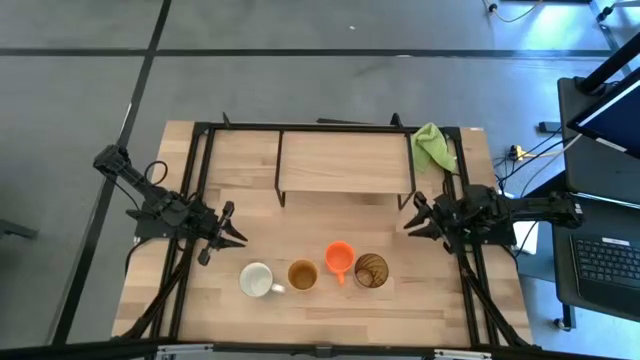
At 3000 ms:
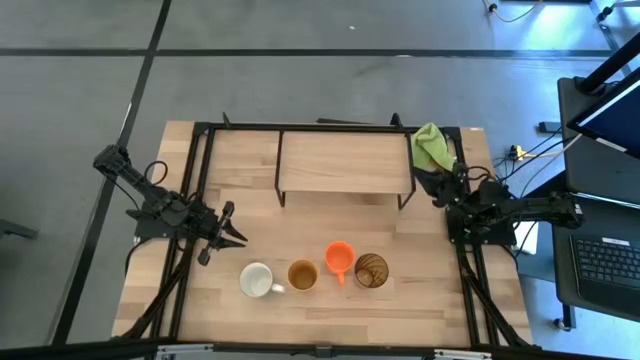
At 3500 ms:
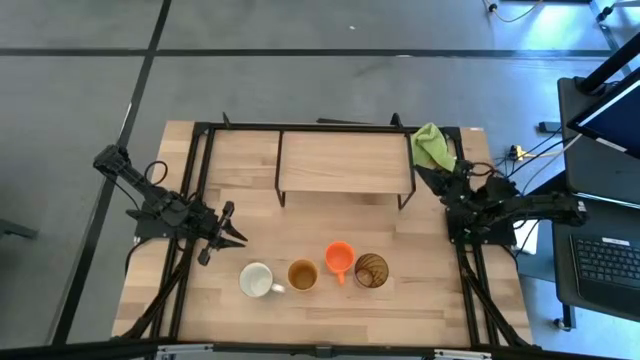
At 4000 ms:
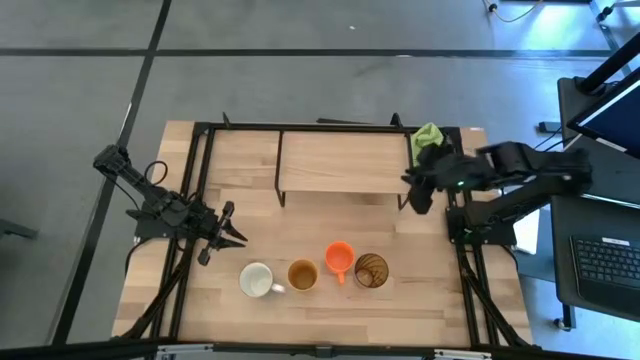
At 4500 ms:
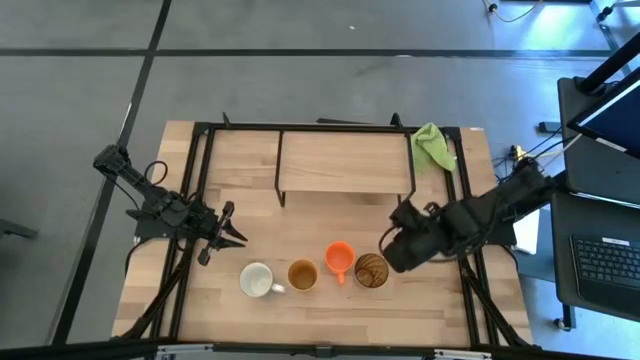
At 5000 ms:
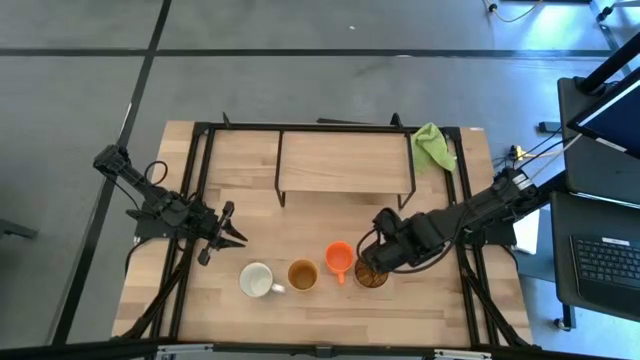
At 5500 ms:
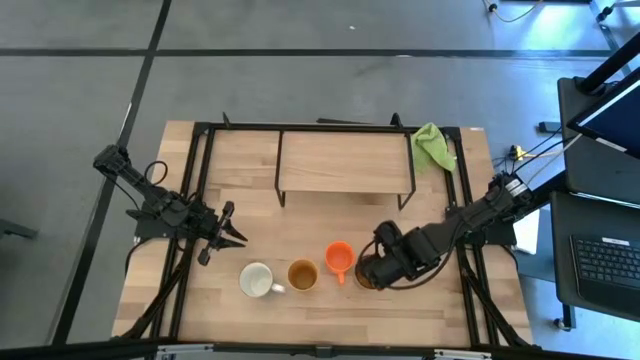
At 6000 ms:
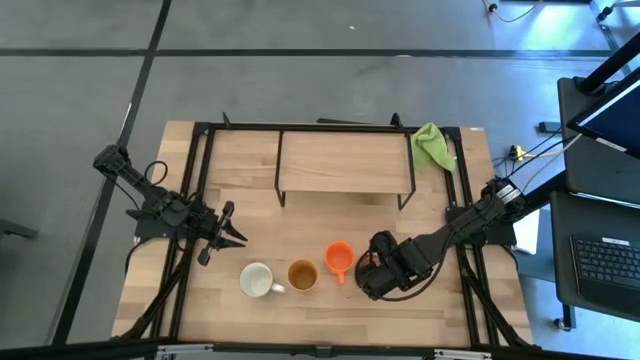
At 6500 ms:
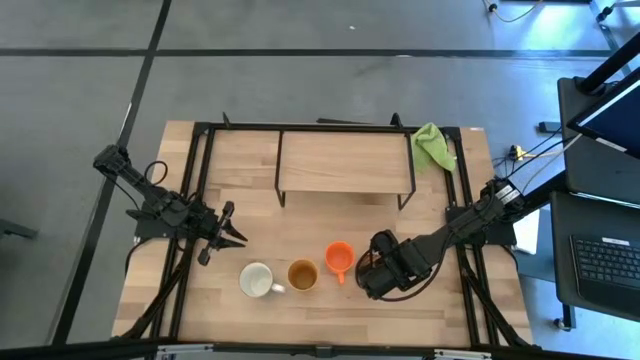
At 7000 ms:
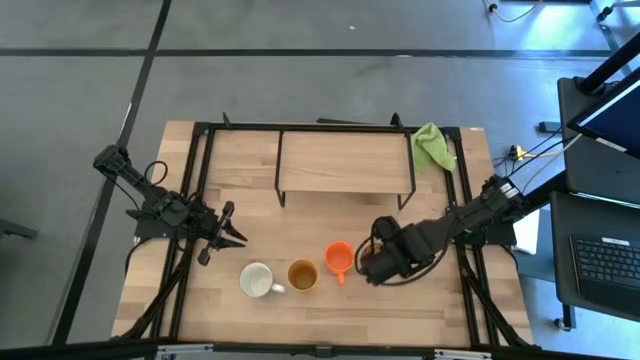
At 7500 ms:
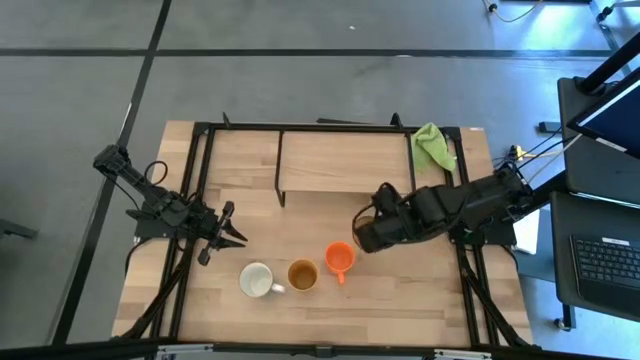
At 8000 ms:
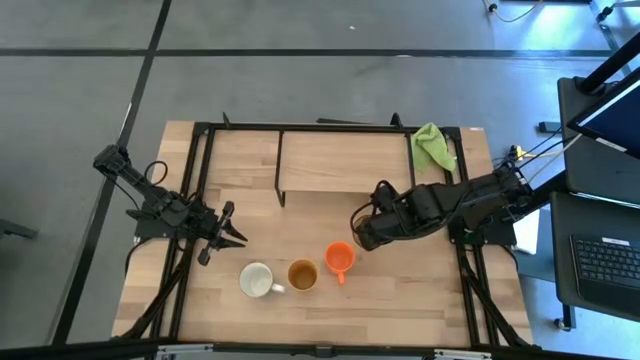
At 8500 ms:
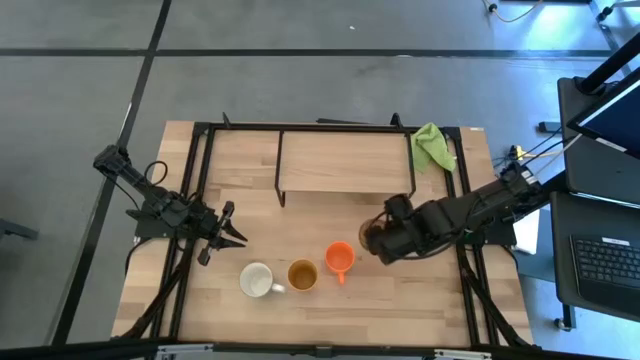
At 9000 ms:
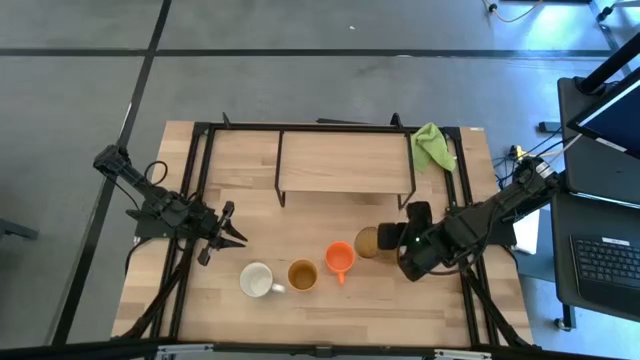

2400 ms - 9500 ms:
Task: Stack small to large cups/mugs on shelf
Put the brown cup on the shelf

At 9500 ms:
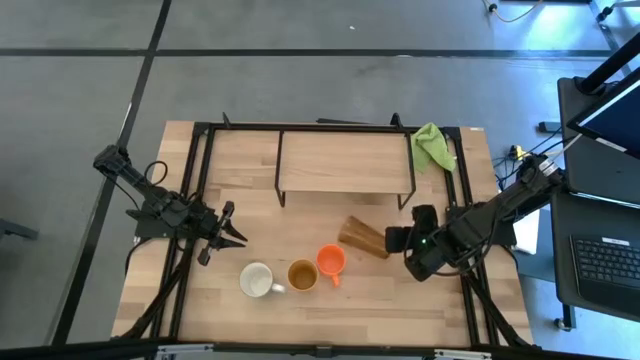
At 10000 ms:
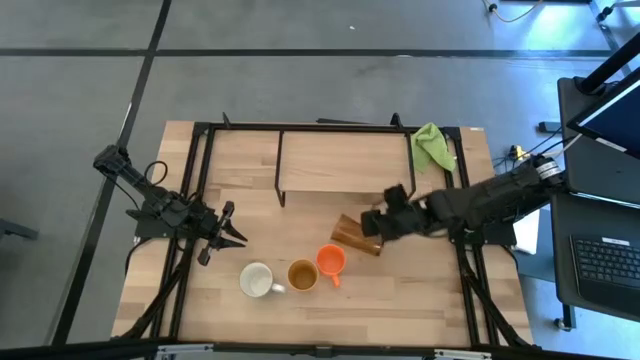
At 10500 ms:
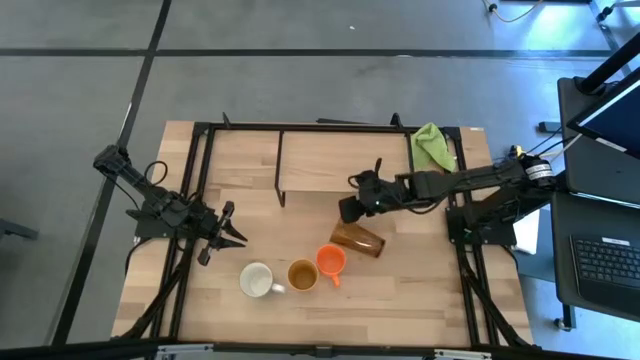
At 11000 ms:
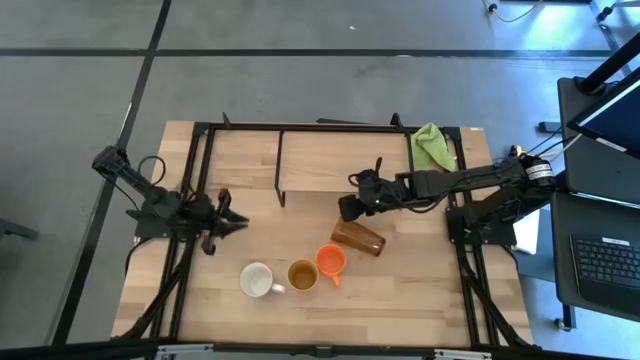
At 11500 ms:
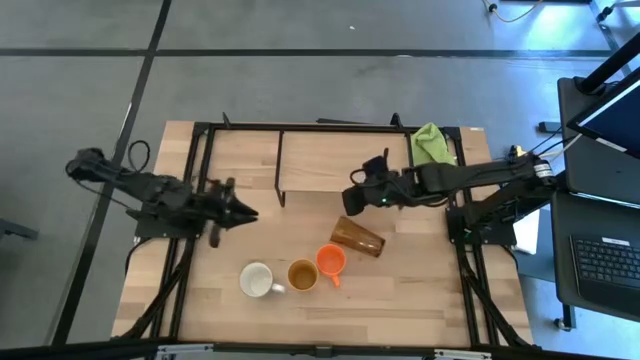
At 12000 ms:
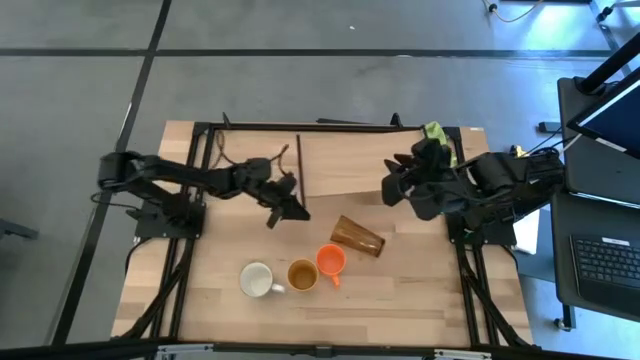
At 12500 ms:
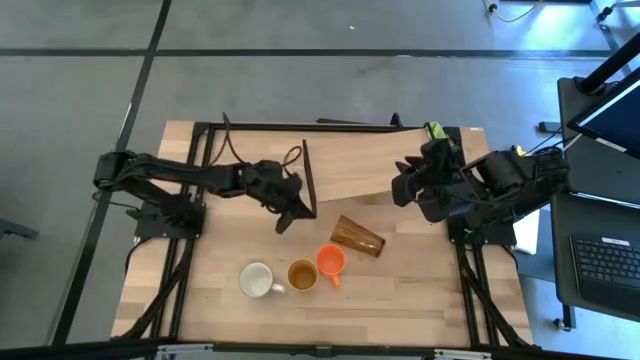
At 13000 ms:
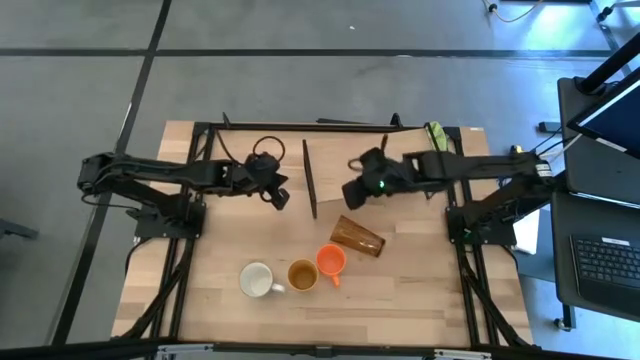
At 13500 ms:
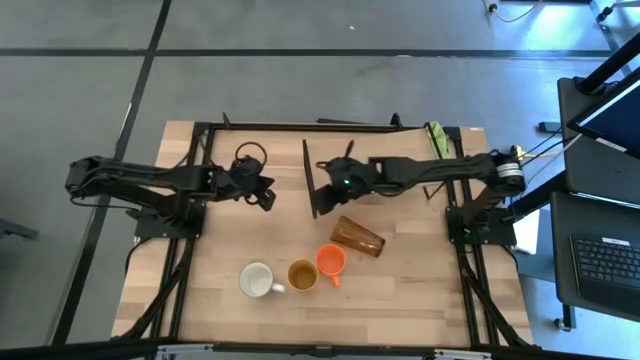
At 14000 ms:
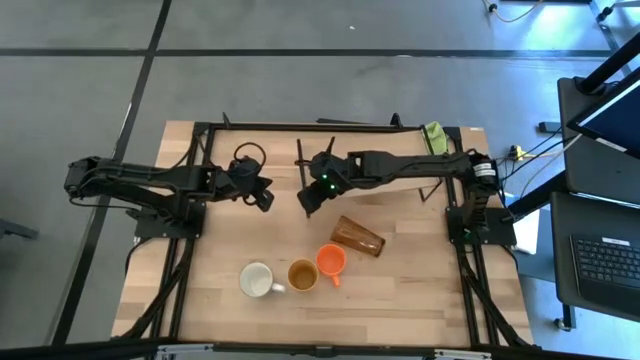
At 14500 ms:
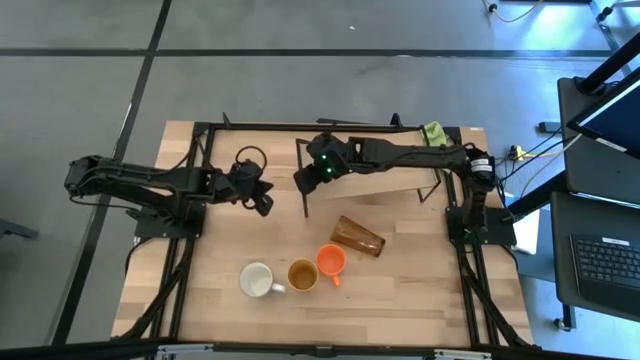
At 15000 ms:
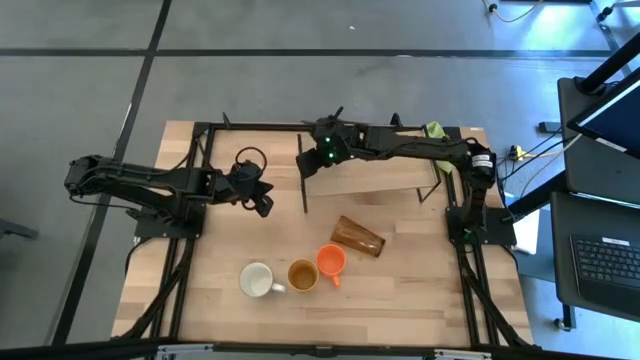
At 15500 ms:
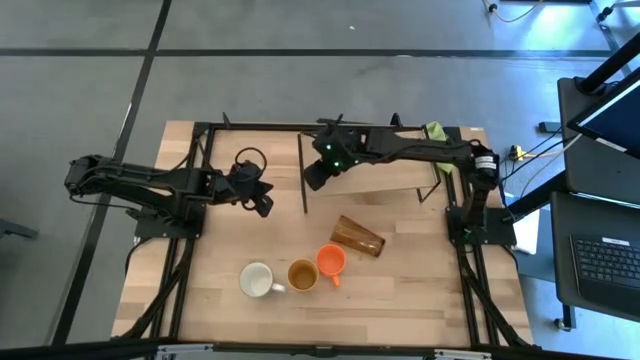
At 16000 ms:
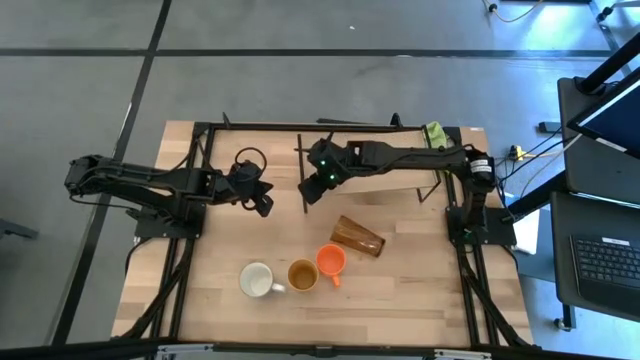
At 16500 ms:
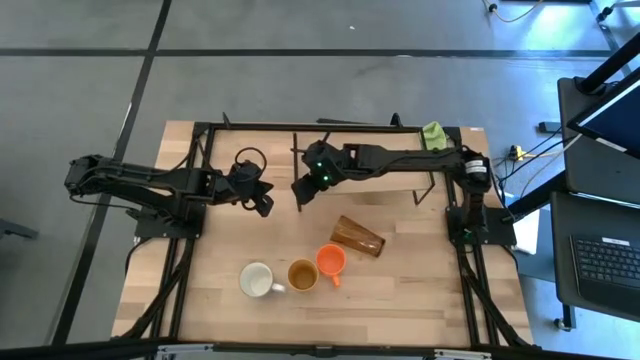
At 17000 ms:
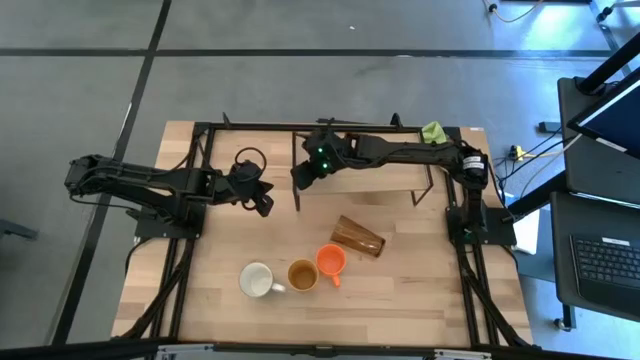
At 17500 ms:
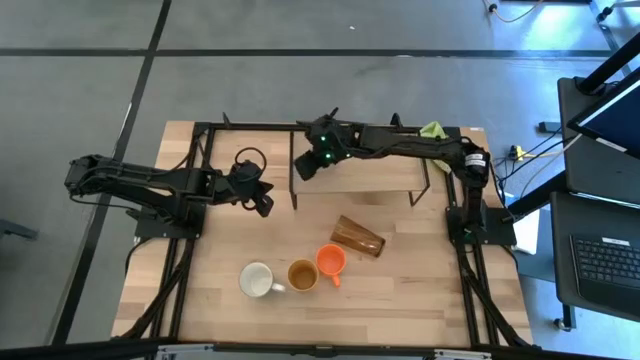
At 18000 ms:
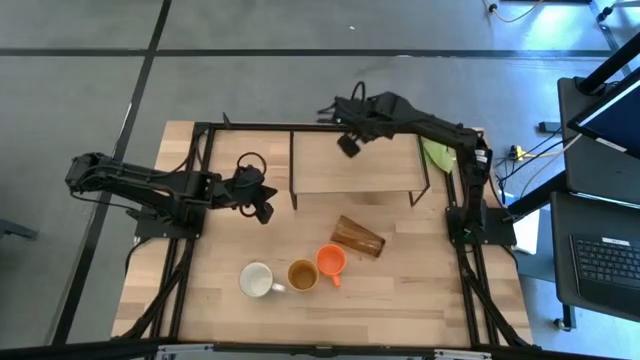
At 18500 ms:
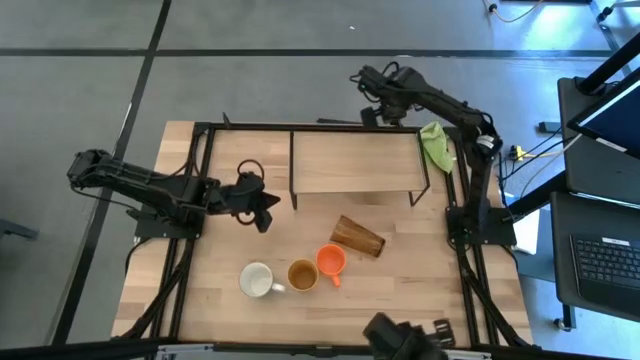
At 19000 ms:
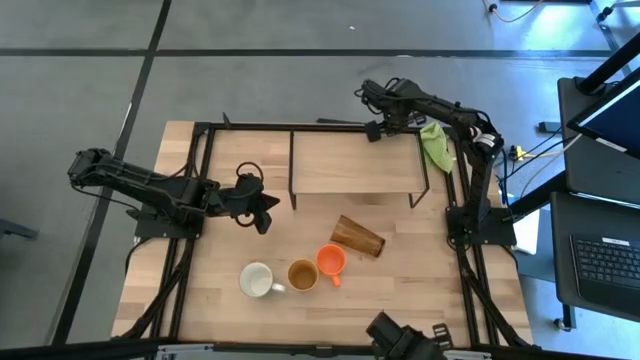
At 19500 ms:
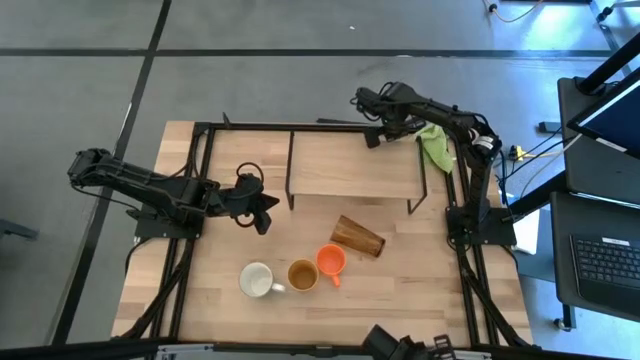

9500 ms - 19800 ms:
Adjust the shelf

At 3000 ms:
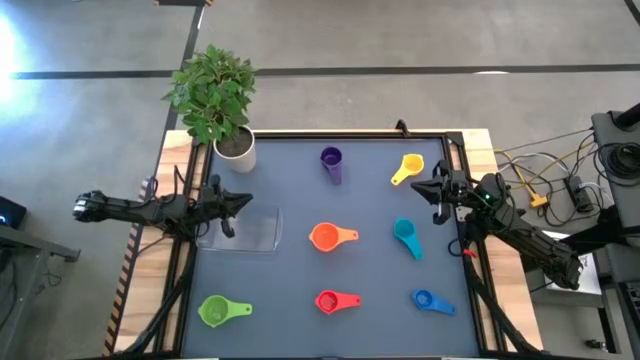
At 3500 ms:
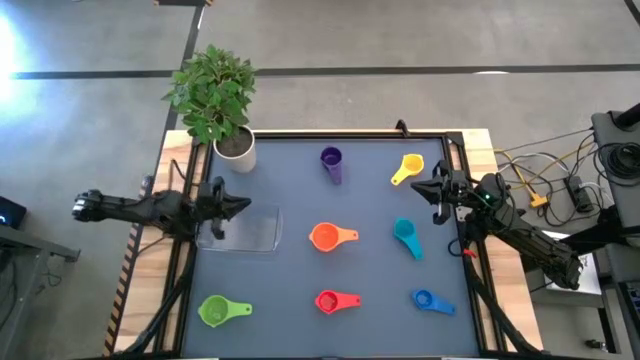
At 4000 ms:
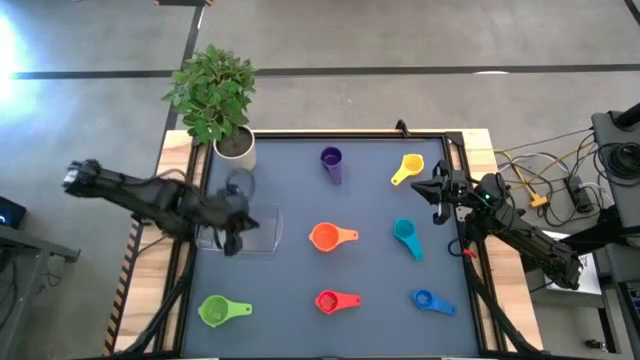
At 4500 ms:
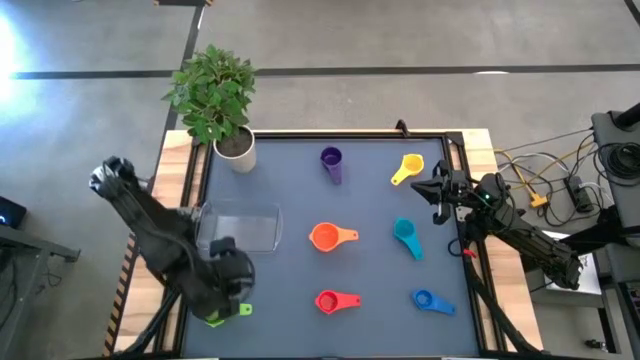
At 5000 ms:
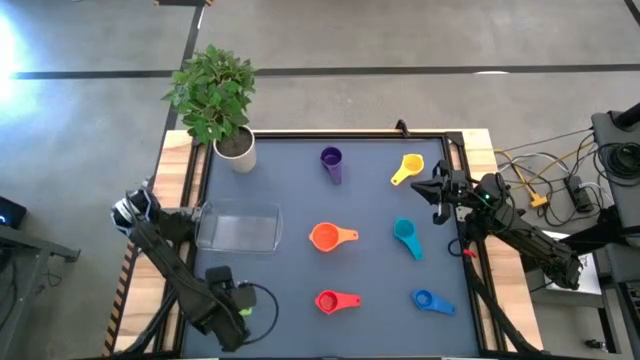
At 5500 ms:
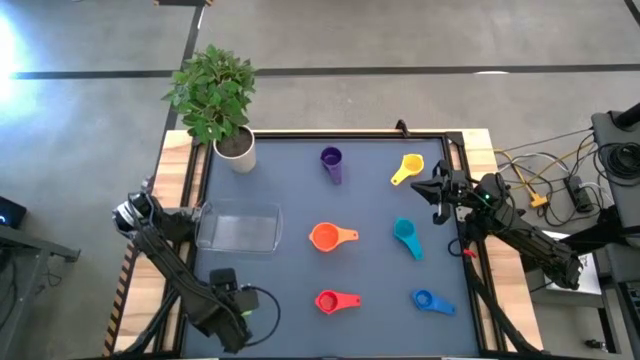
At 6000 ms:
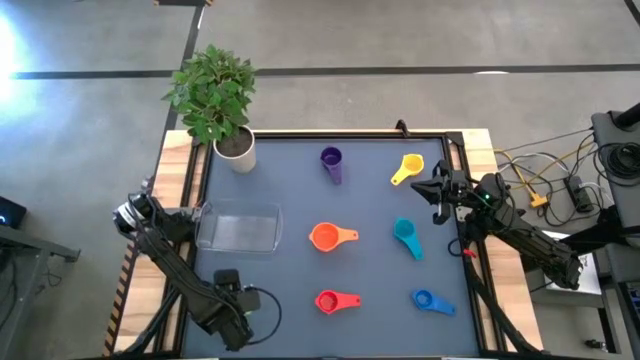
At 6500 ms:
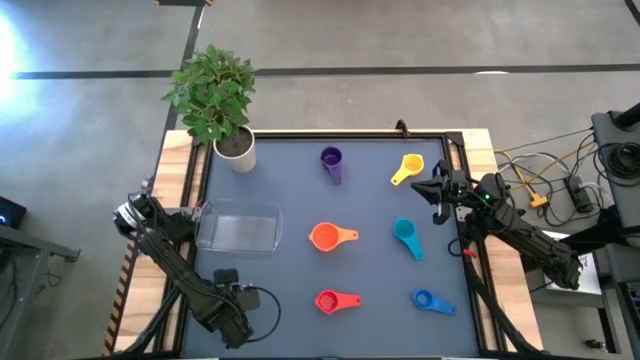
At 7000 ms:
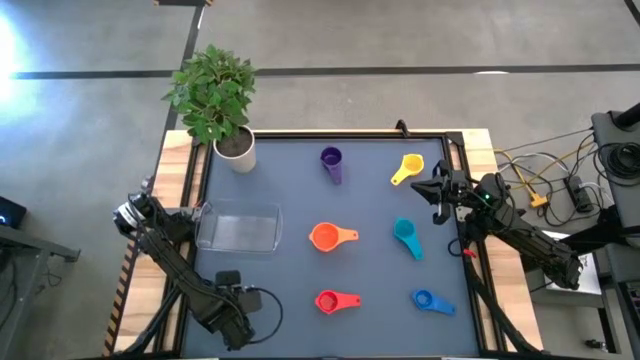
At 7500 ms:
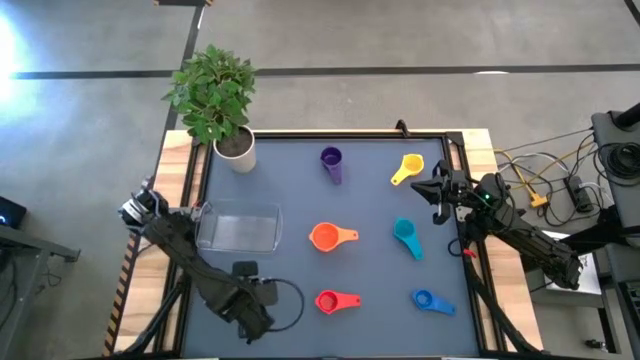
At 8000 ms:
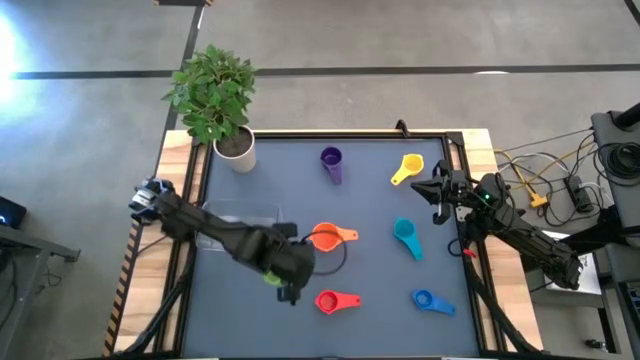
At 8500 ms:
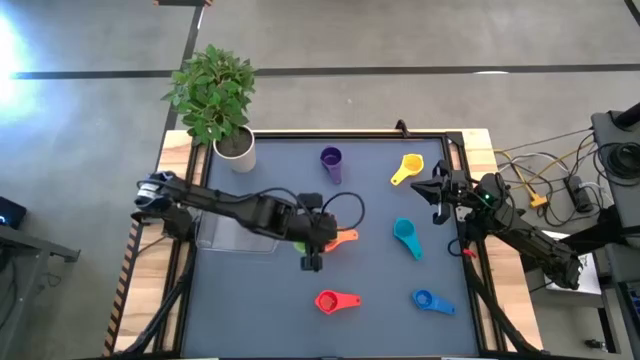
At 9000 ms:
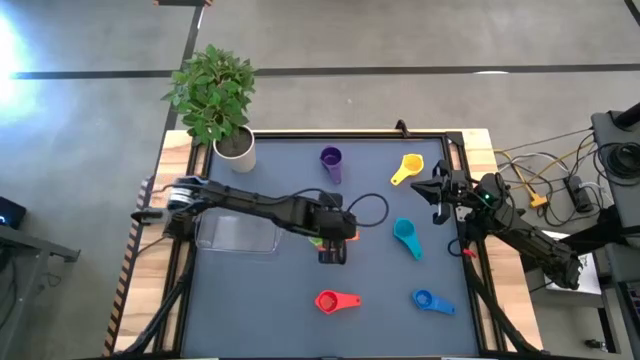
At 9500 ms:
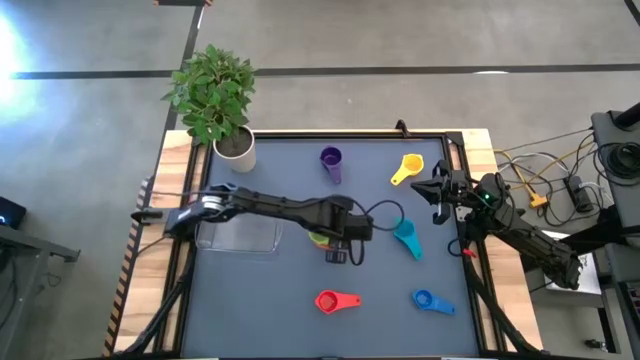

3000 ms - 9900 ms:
Task: Nest measuring cups in basket
Stack the green measuring cup on top of the orange measuring cup
